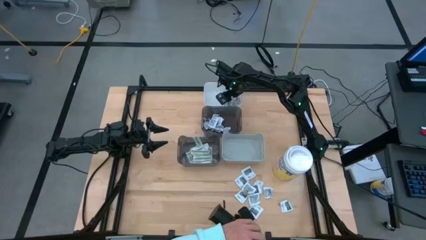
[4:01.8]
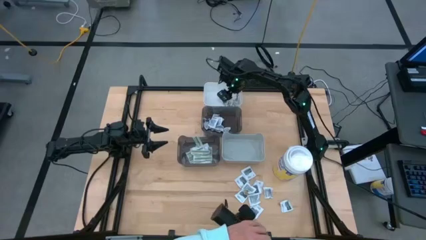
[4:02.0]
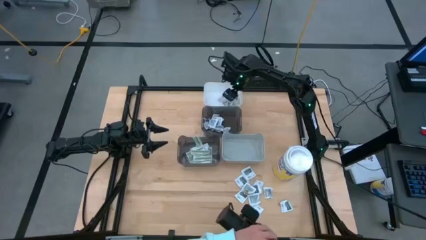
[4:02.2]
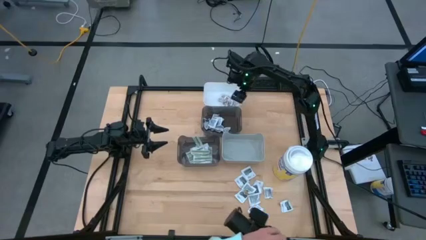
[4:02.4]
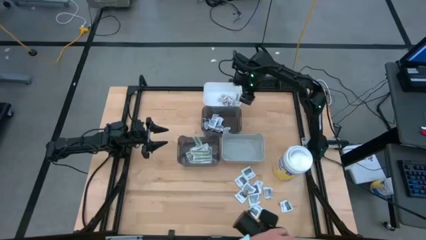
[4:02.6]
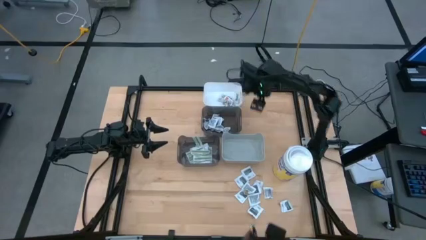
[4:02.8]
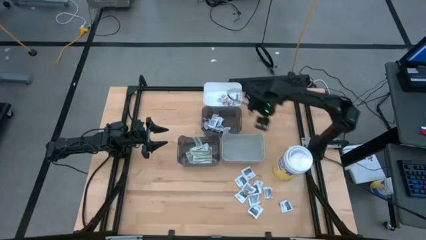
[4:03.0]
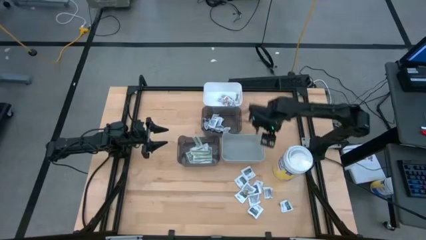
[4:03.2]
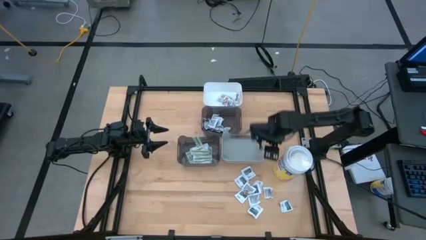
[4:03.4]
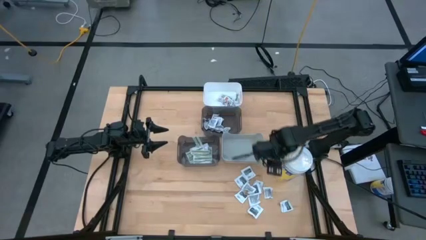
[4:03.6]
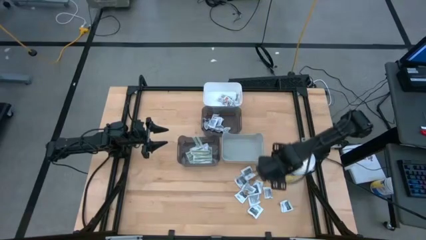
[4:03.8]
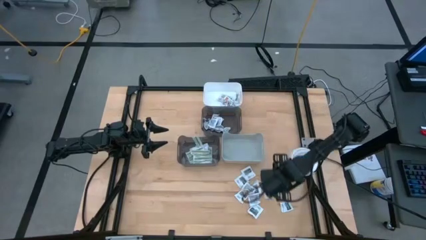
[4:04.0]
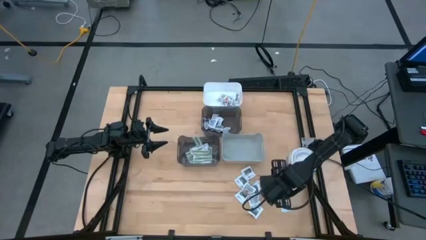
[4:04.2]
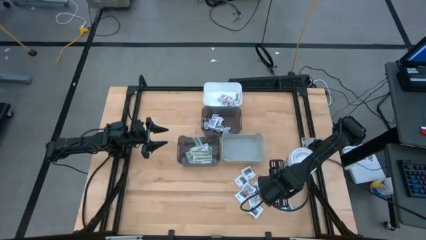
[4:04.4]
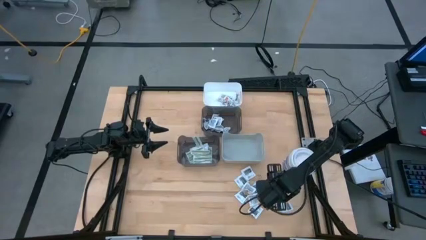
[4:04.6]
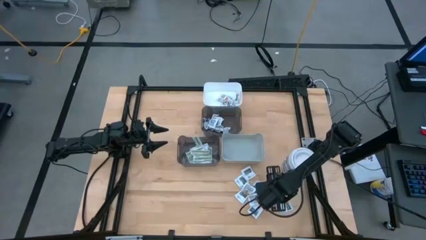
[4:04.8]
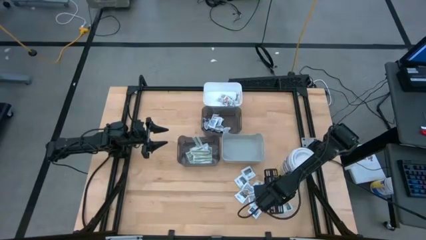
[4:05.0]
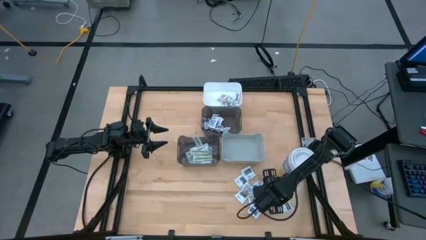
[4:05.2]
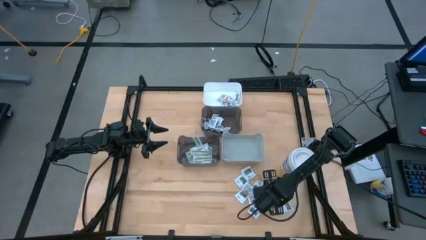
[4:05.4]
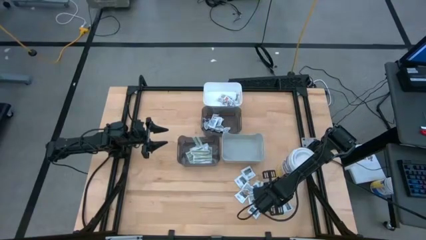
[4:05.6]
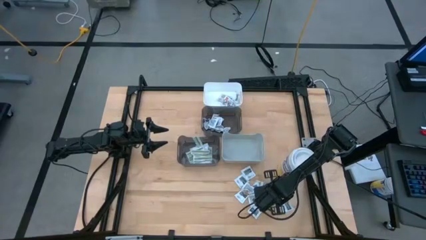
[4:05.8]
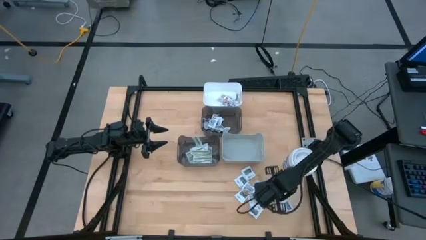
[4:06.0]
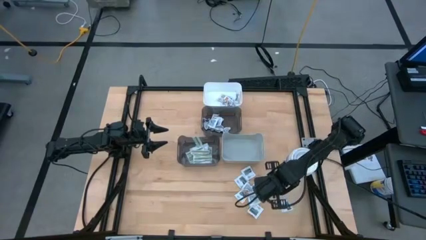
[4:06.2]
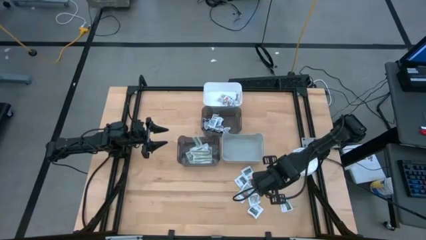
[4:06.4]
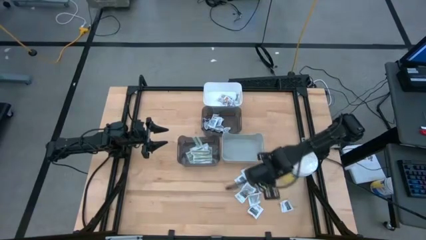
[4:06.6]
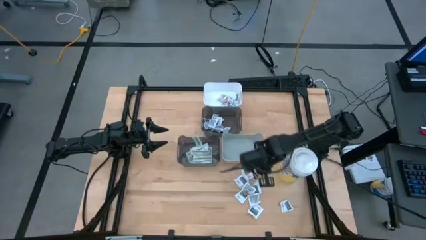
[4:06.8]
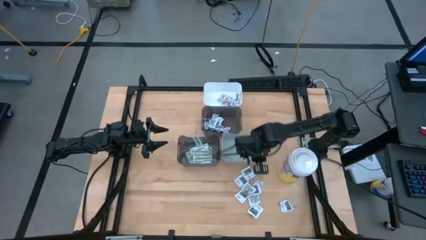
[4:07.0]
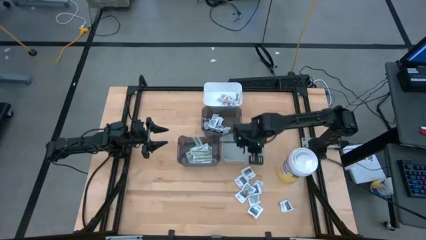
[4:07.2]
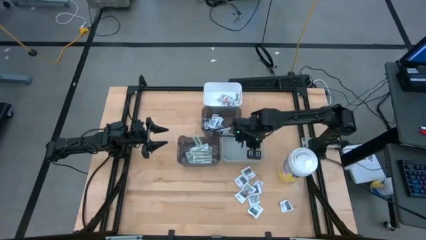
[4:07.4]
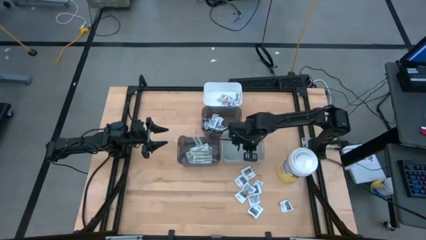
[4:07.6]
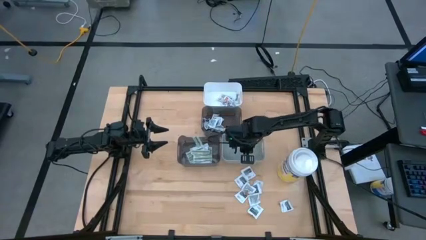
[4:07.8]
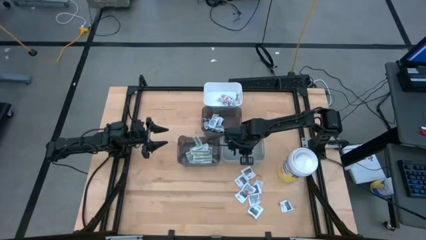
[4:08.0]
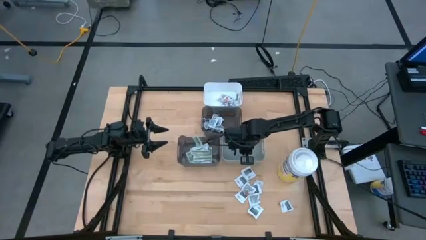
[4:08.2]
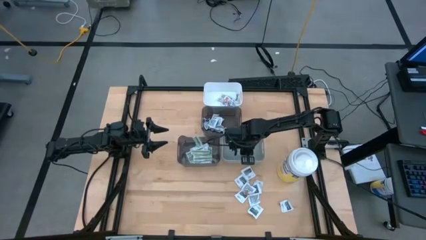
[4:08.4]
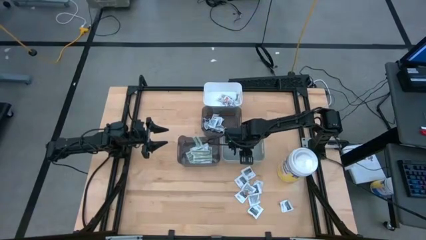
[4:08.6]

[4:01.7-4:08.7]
Task: Pick & Place First Aid Supplies
Put the white towelette pack into the gray bin

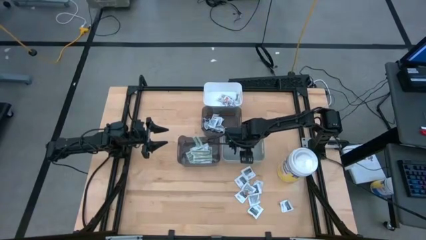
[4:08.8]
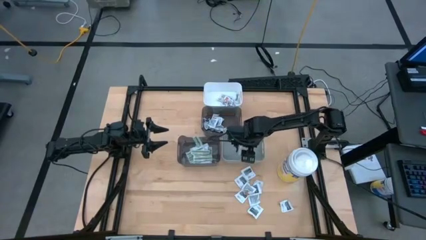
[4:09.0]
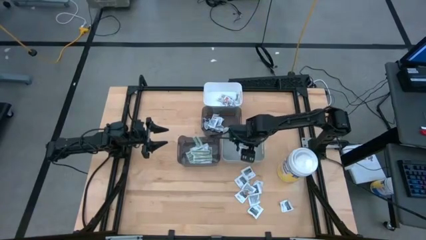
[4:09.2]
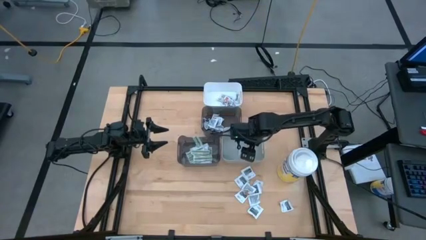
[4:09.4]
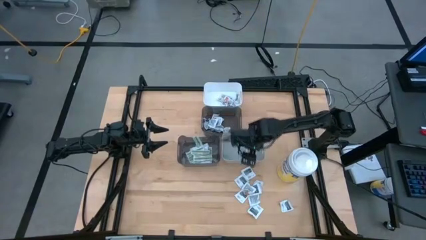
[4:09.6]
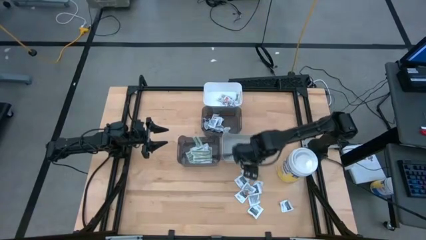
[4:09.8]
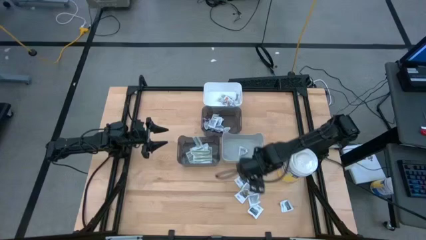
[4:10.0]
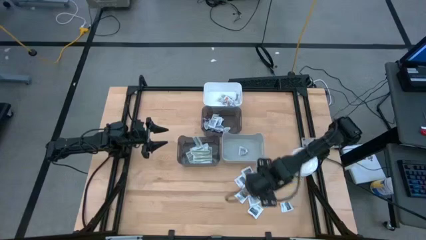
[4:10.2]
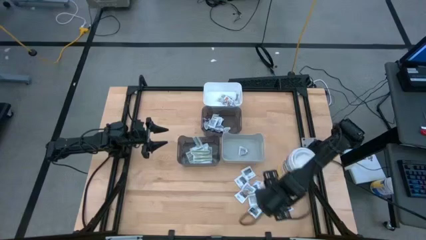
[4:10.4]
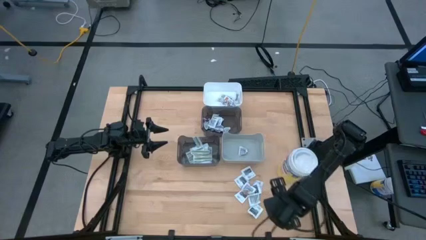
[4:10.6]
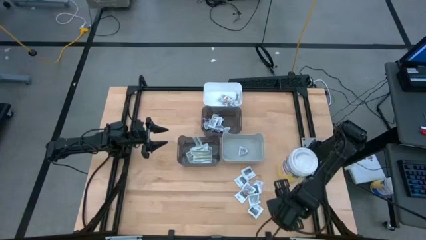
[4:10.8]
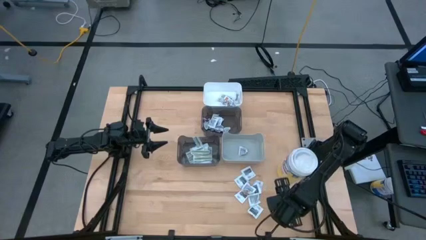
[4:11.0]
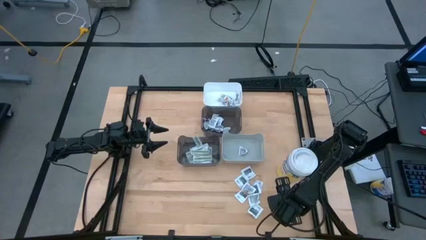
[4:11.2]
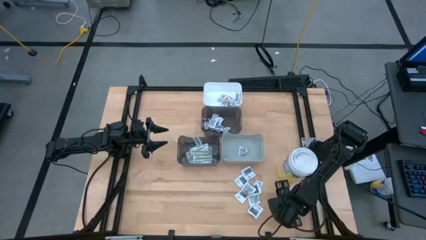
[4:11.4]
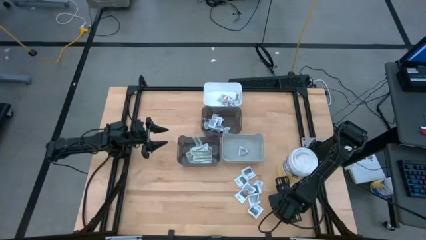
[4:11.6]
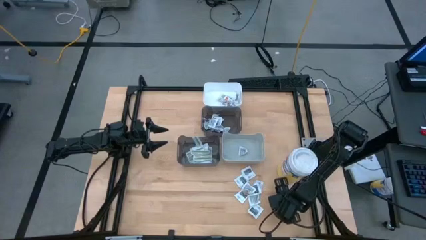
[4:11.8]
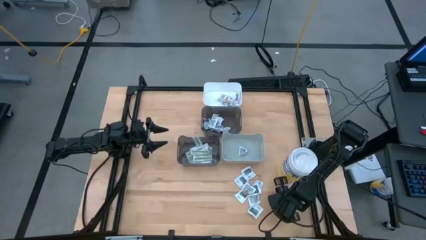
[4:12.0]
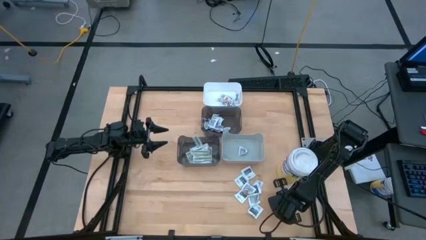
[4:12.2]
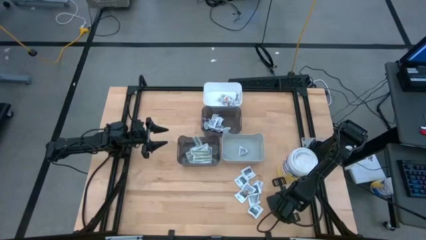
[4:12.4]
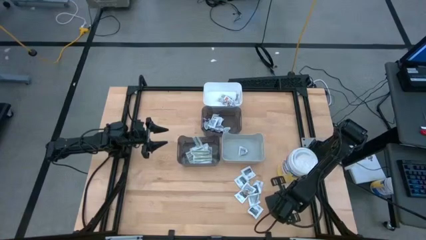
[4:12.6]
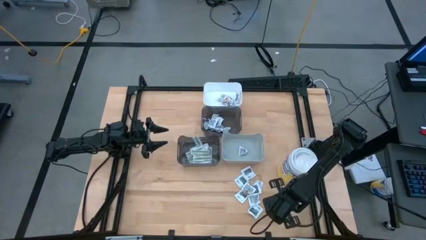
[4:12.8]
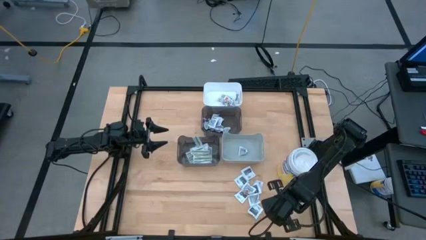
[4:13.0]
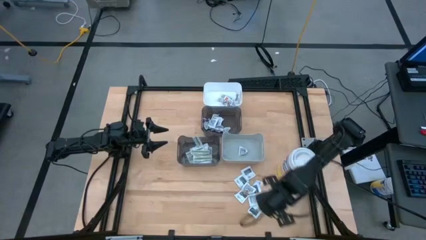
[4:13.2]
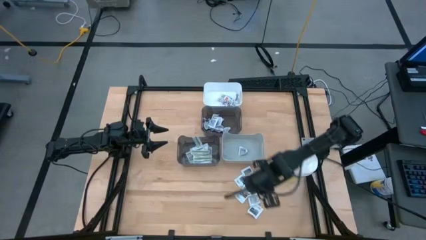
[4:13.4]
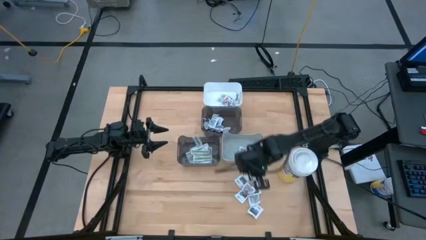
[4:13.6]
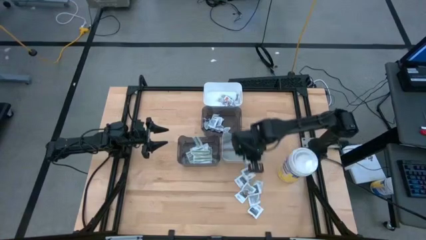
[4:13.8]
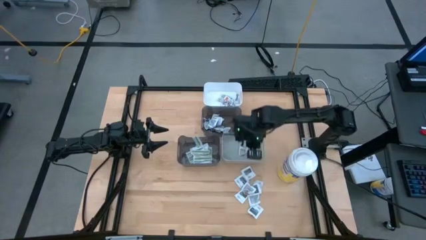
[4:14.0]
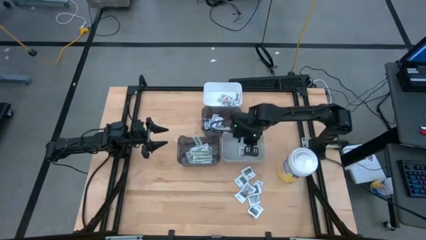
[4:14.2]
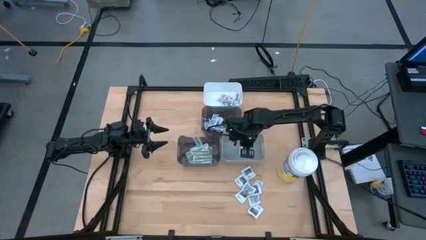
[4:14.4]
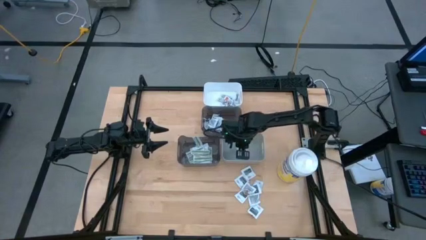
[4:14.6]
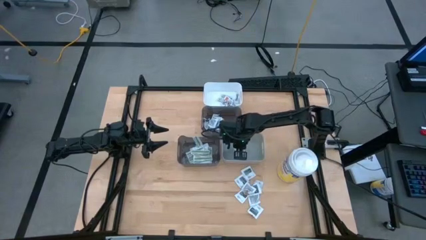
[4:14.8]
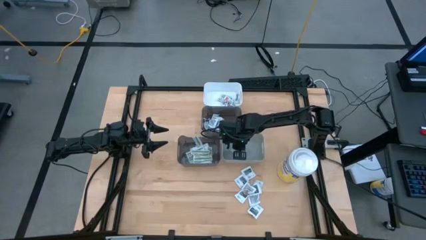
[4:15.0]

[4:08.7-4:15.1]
Put the white towelette pack into the gray bin
